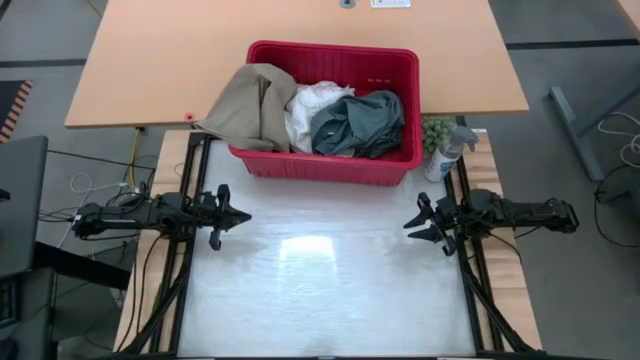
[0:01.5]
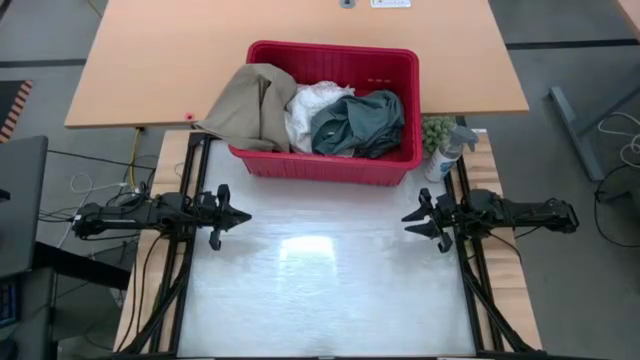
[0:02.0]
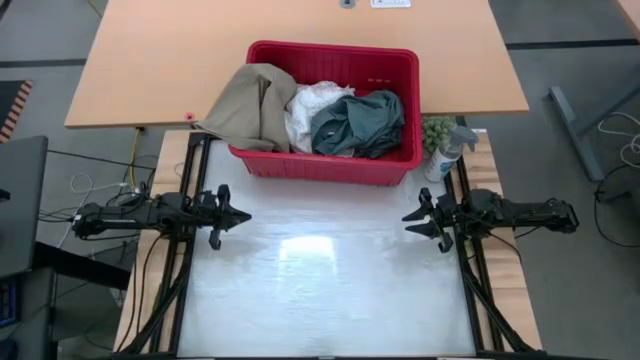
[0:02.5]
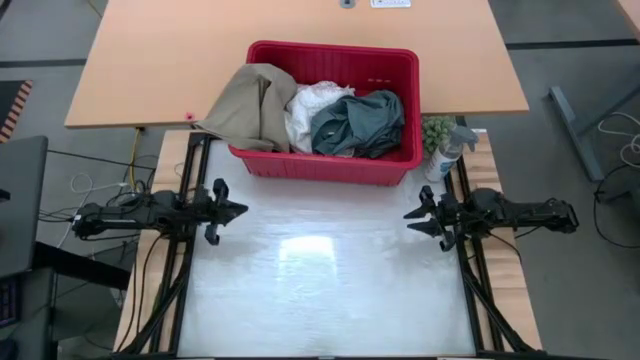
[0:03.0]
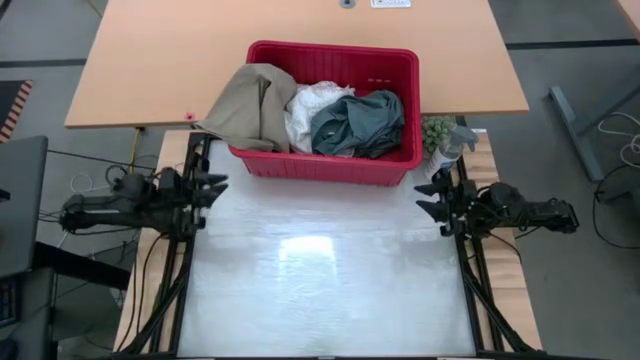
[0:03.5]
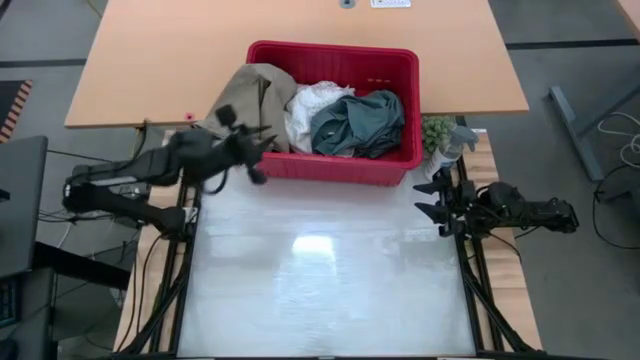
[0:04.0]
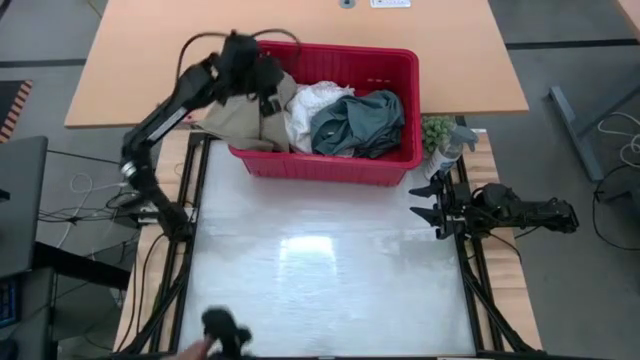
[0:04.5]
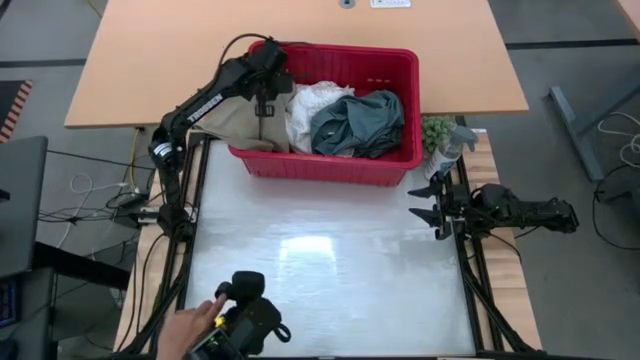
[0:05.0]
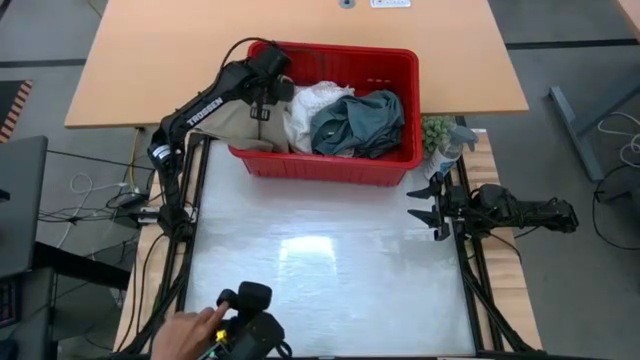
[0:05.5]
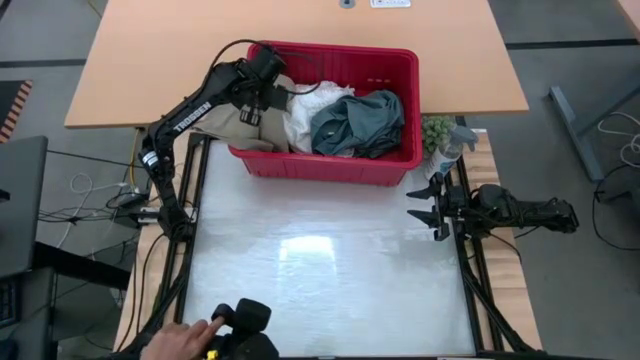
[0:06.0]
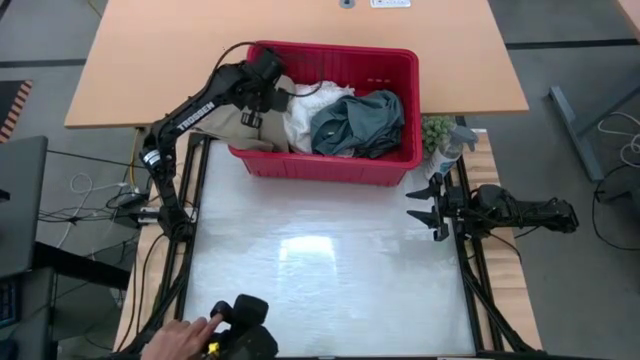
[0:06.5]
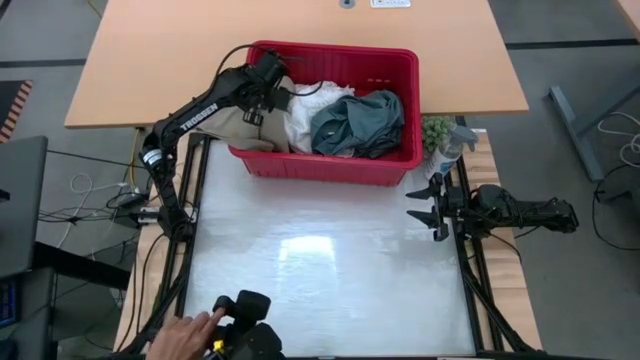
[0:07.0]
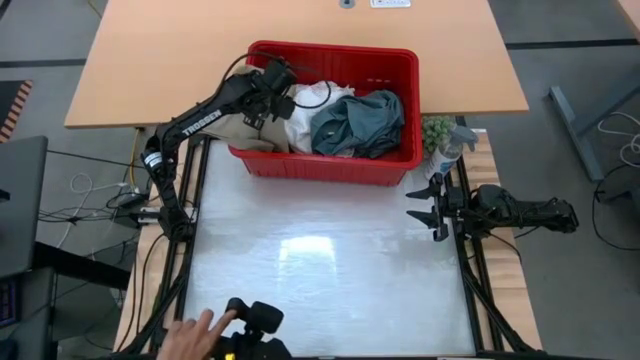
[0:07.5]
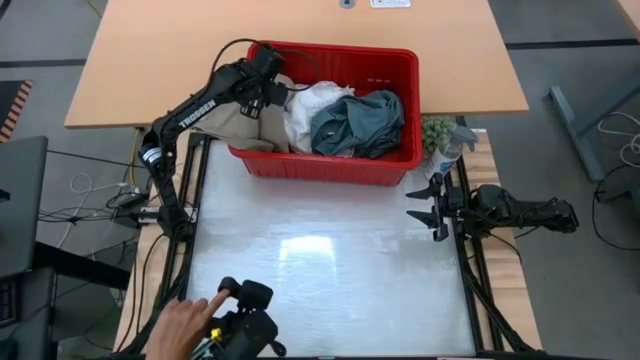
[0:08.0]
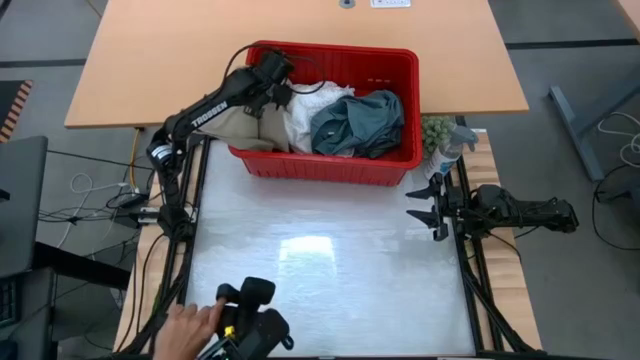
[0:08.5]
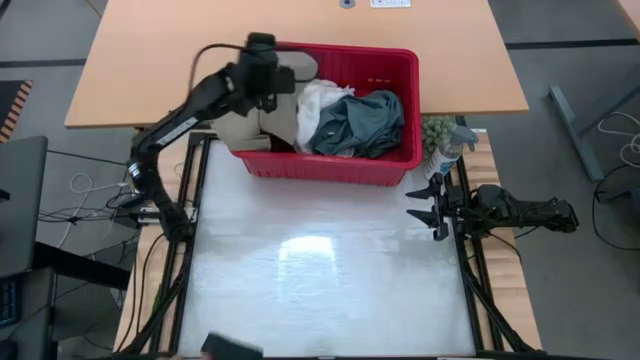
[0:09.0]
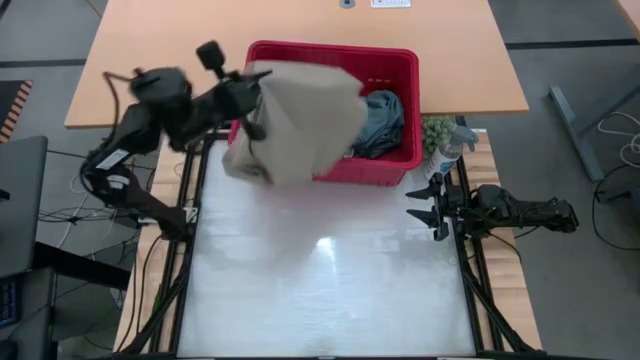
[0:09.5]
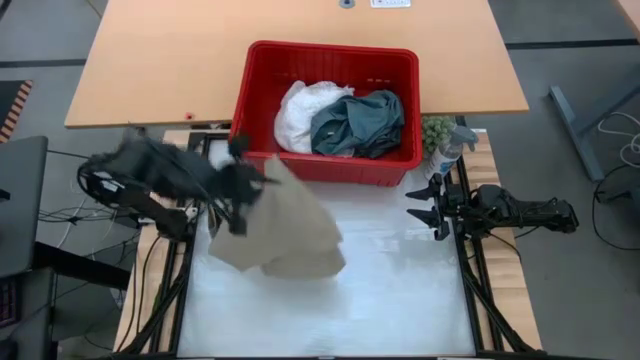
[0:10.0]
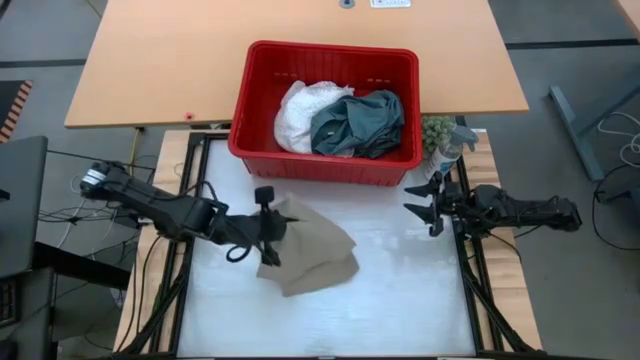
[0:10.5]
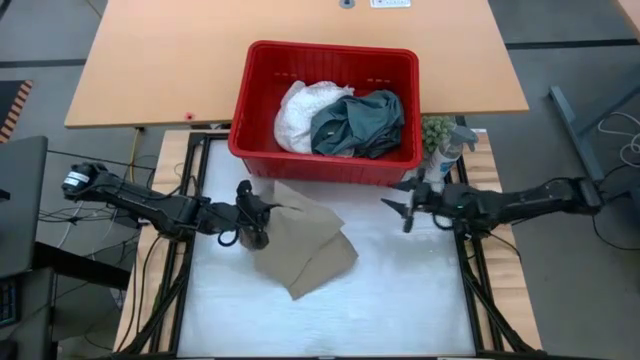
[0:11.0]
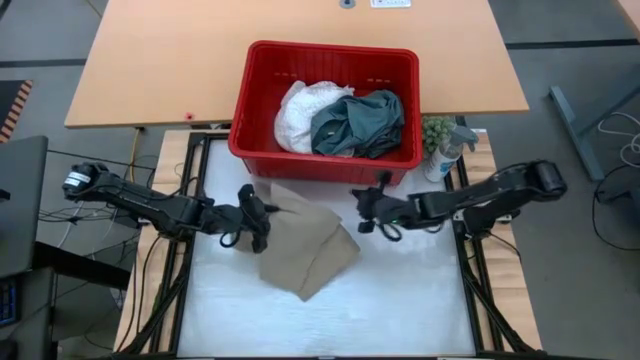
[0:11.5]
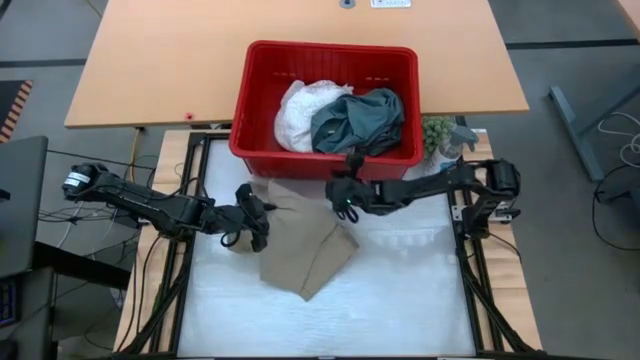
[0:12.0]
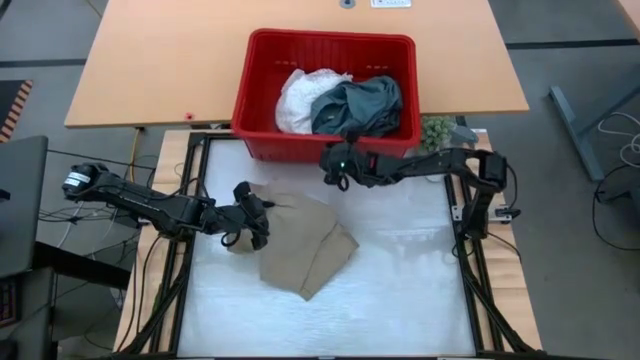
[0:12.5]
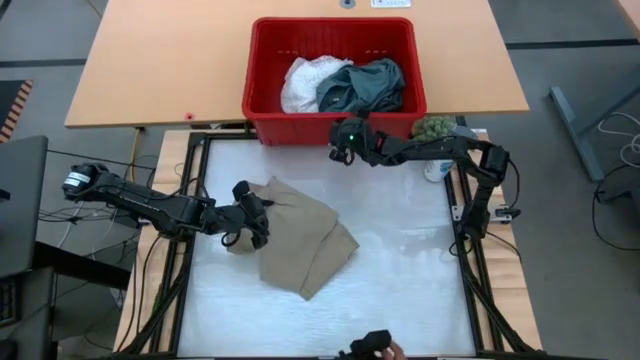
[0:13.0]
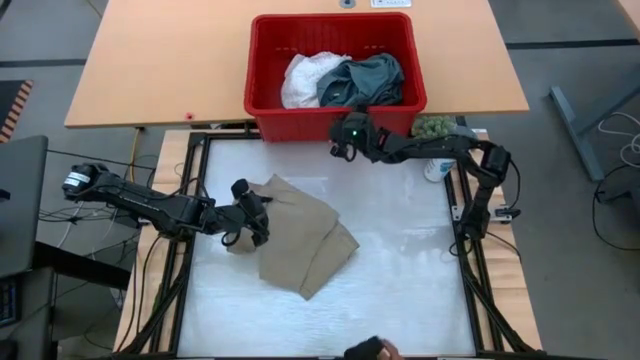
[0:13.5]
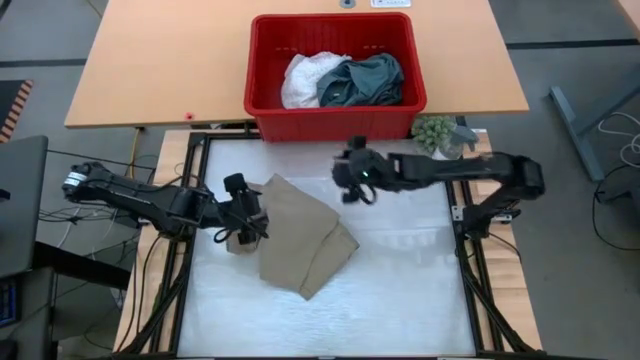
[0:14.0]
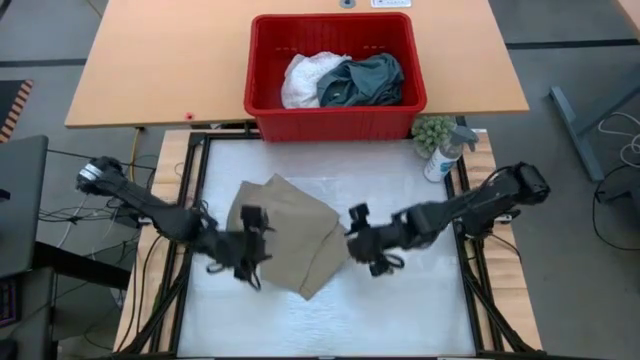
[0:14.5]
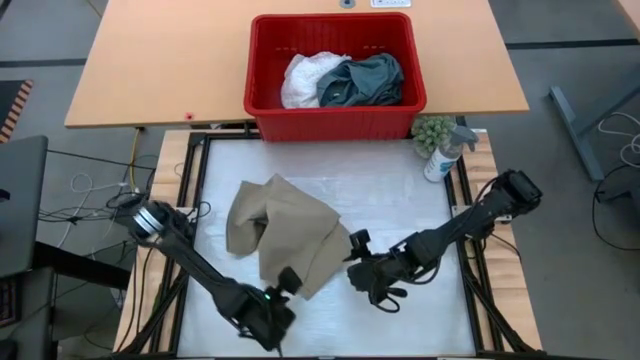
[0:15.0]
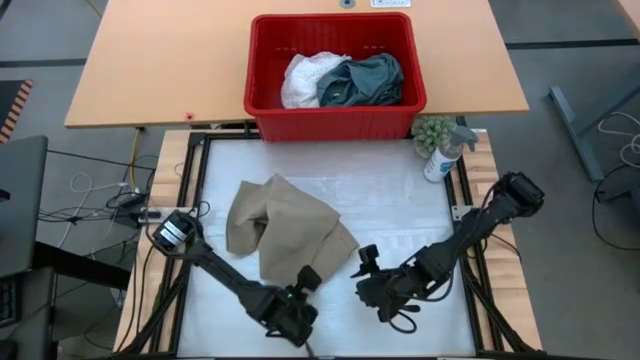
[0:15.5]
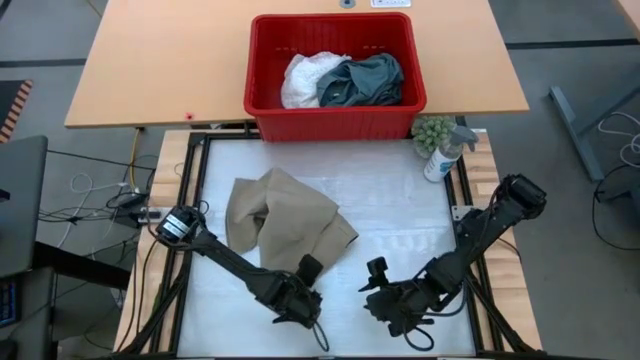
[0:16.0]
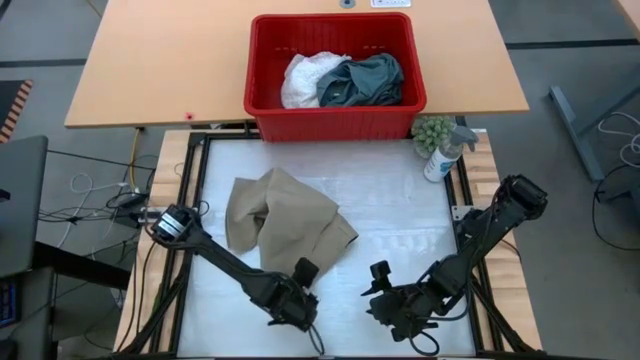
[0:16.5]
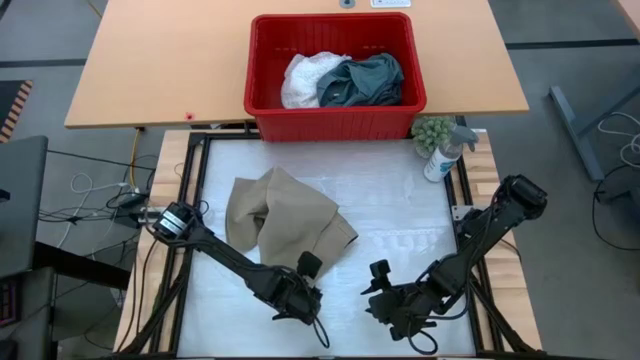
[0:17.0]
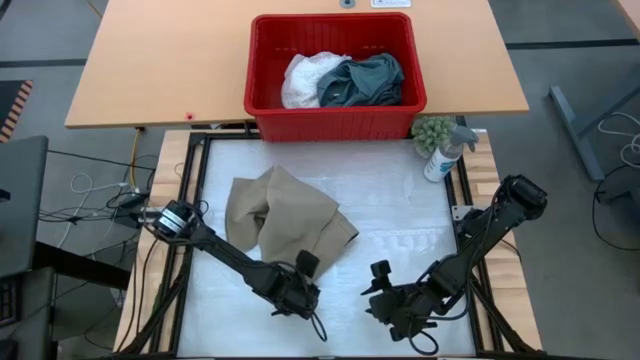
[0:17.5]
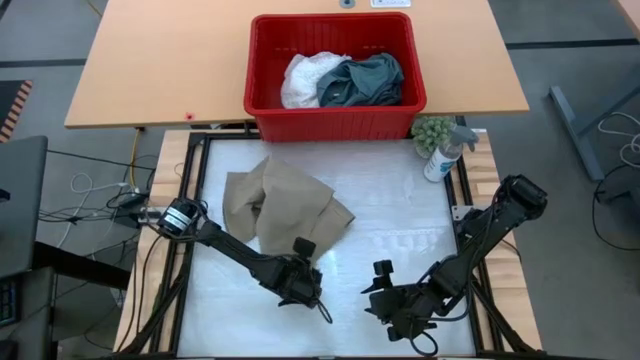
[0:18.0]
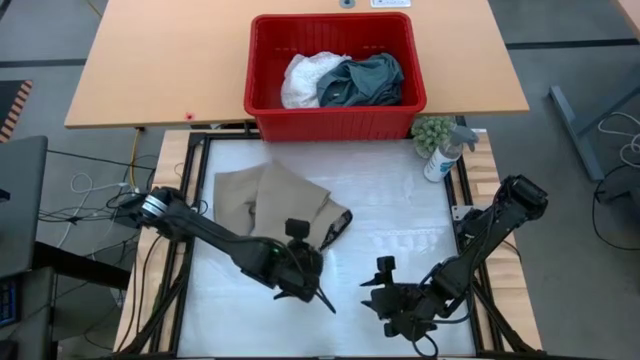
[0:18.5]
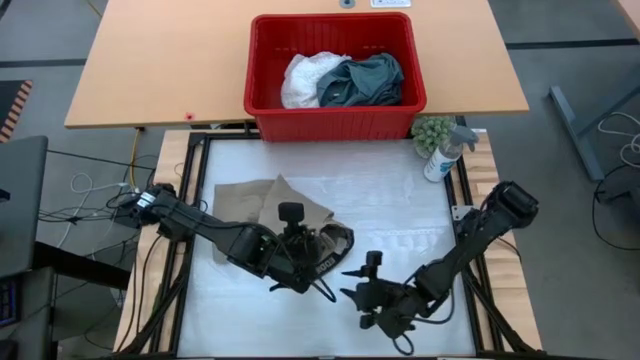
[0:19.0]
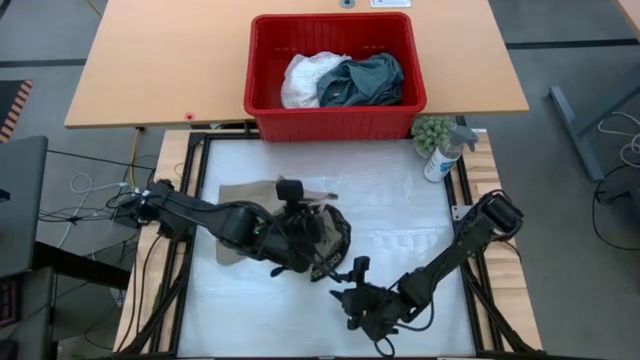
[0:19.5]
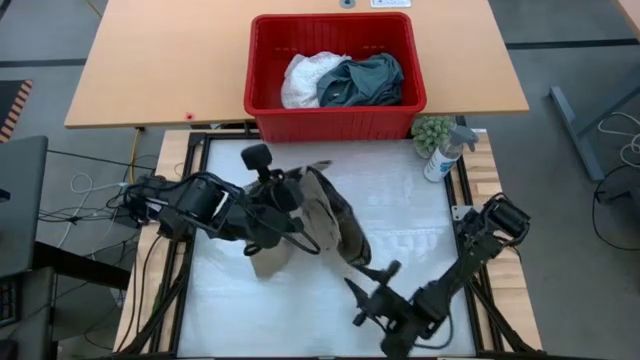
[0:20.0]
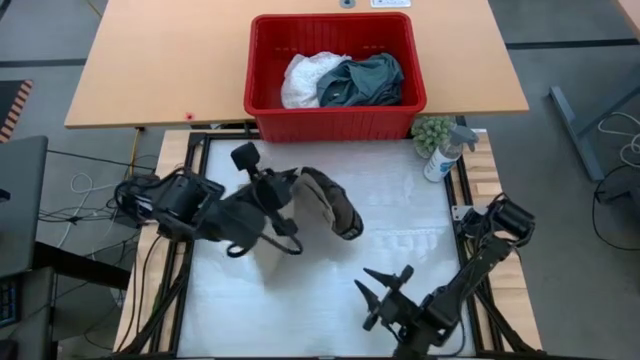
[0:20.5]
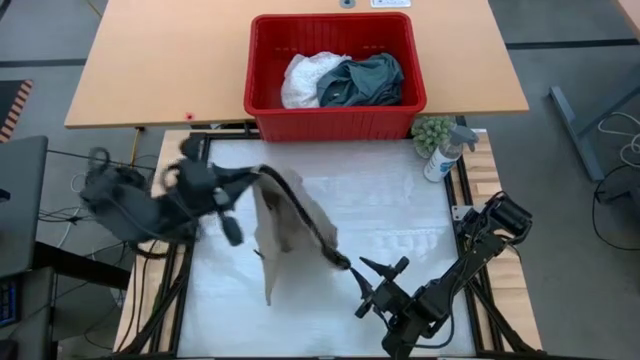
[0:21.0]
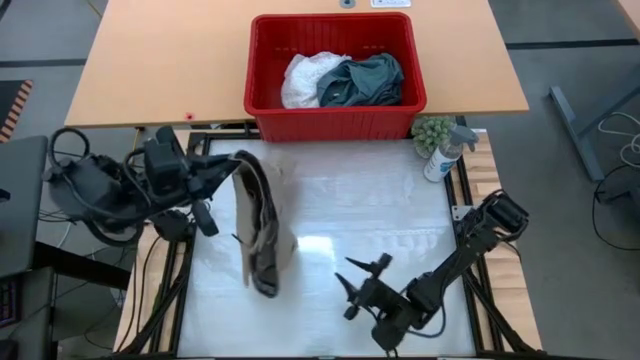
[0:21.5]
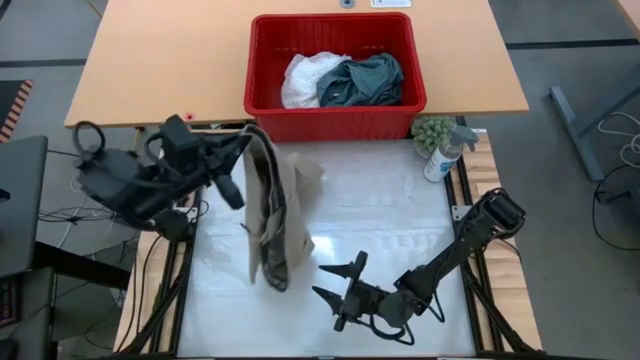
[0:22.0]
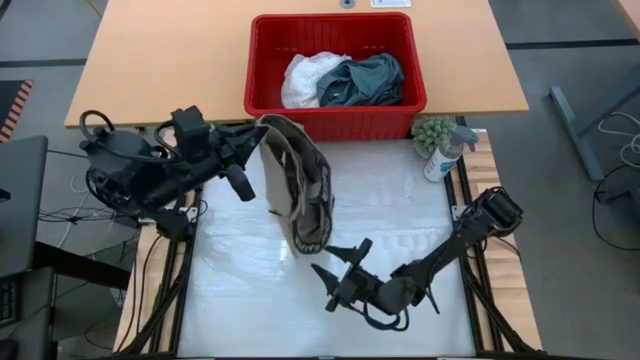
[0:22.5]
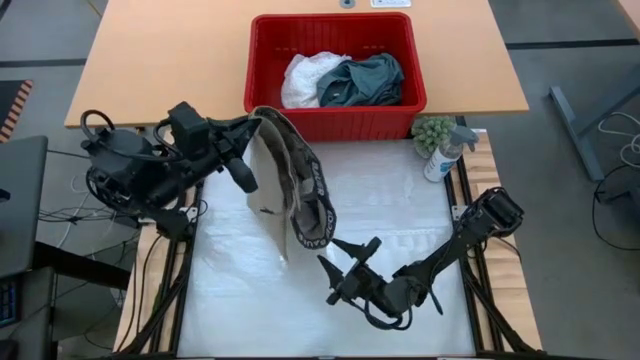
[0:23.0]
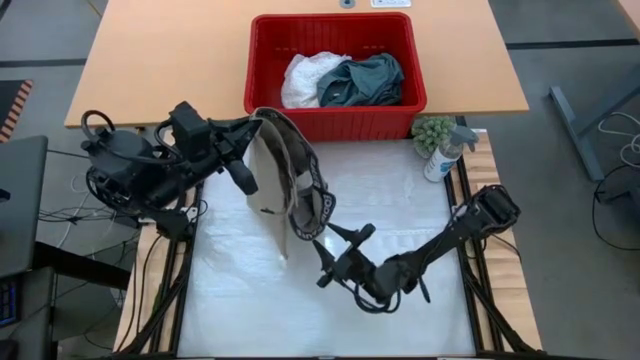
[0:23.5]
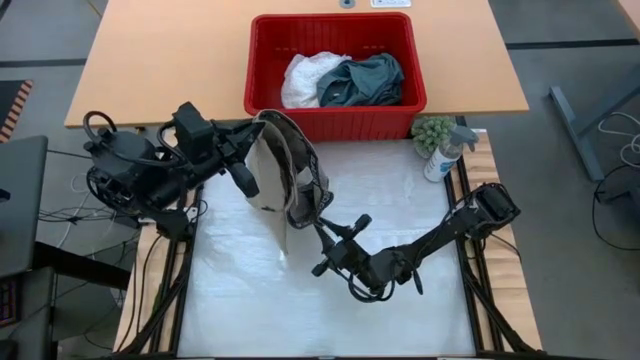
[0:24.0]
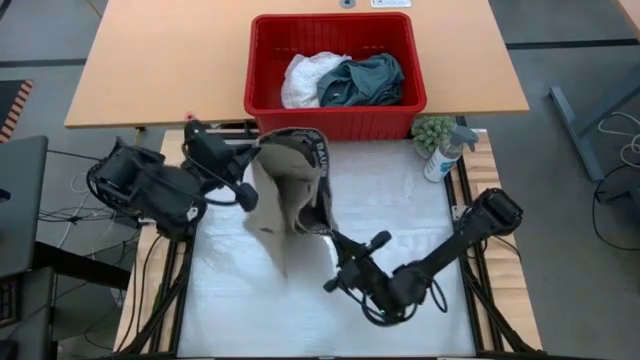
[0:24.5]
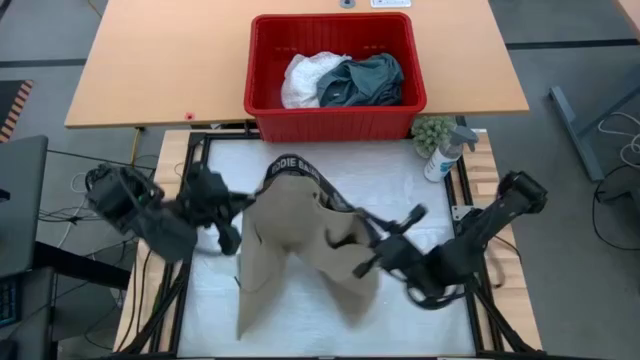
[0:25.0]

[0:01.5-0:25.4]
Task: Fold Laundry from Bin
Fold the brown short pants in the red bin
